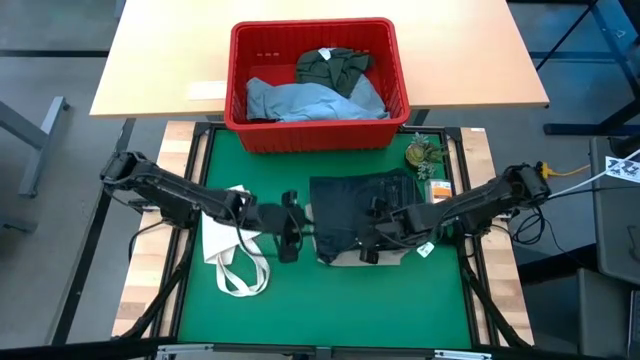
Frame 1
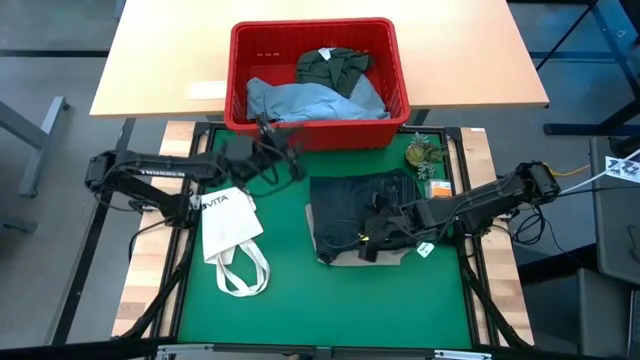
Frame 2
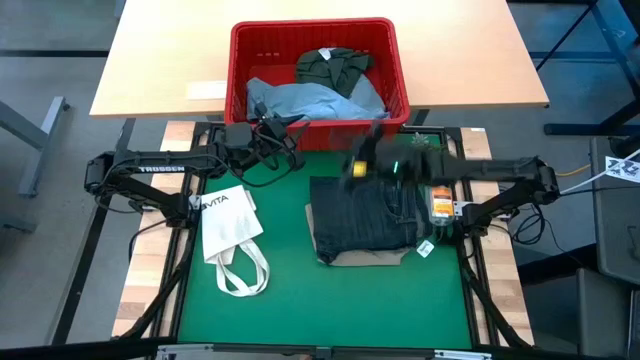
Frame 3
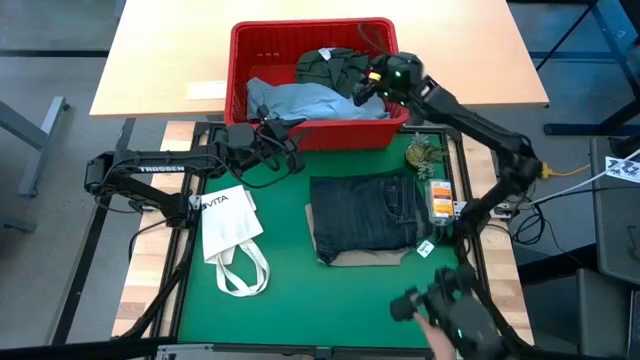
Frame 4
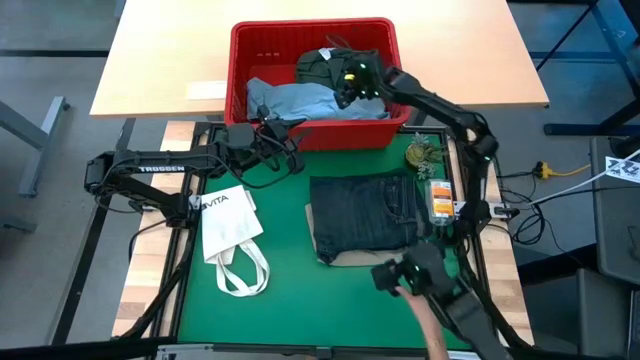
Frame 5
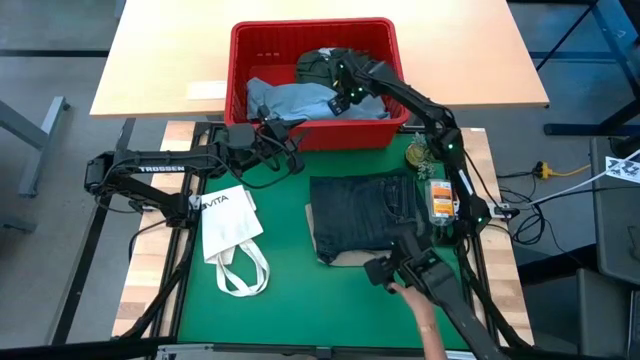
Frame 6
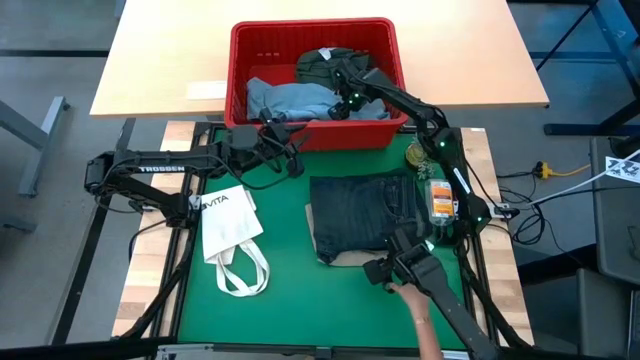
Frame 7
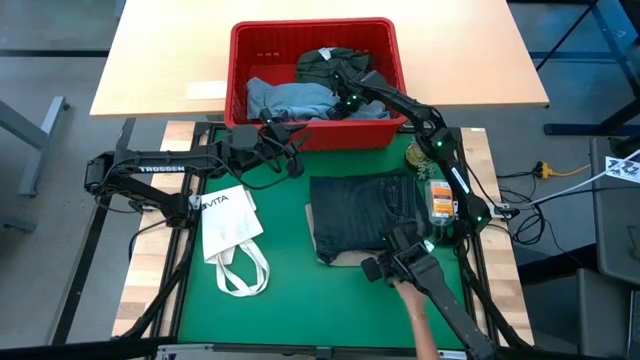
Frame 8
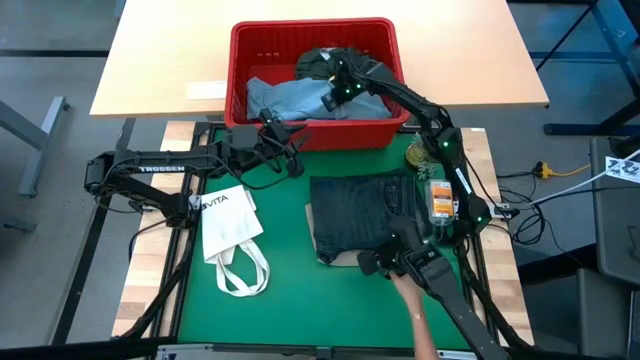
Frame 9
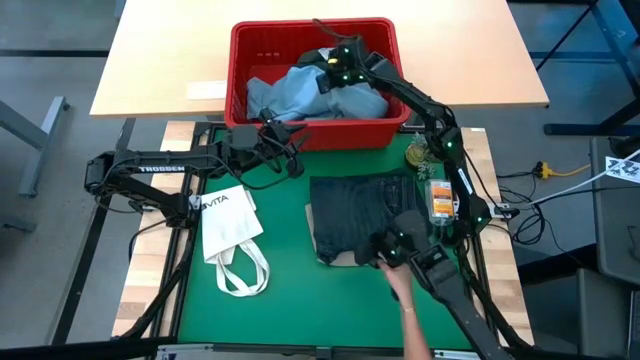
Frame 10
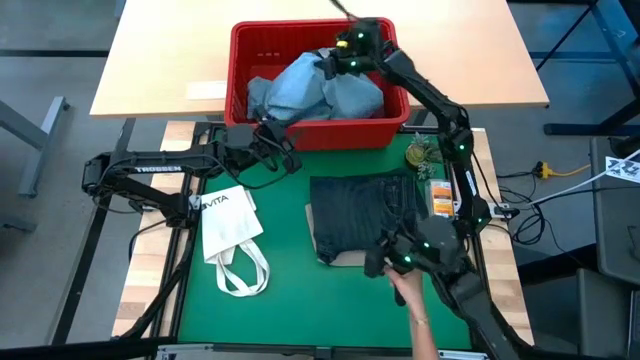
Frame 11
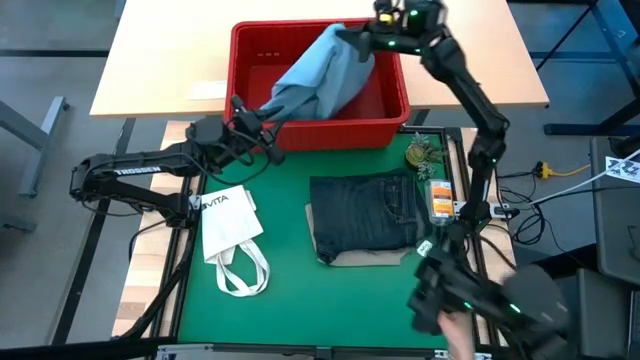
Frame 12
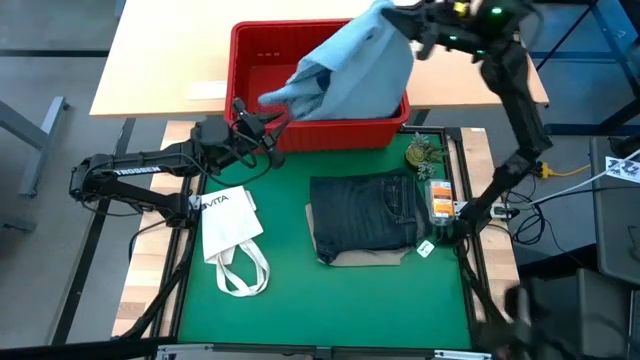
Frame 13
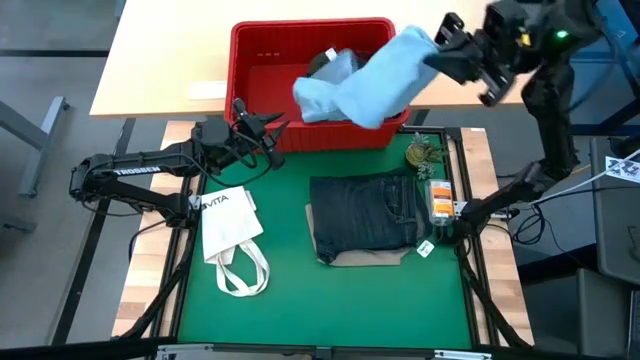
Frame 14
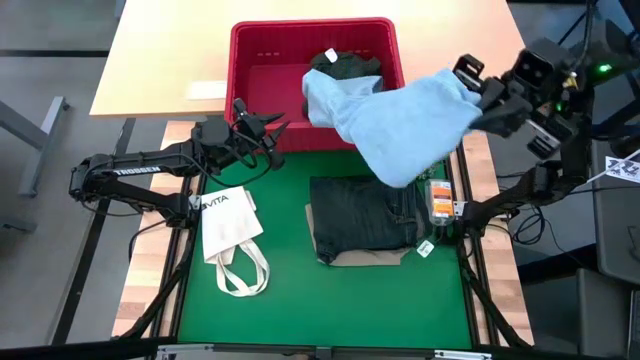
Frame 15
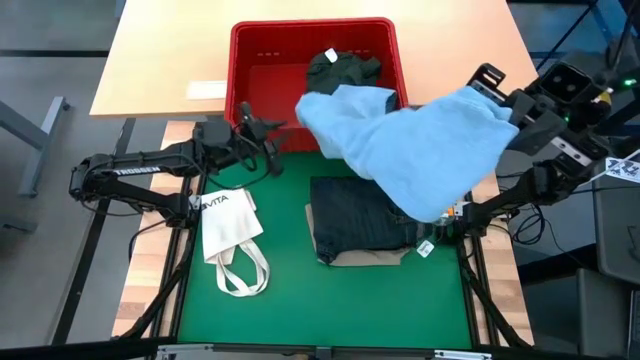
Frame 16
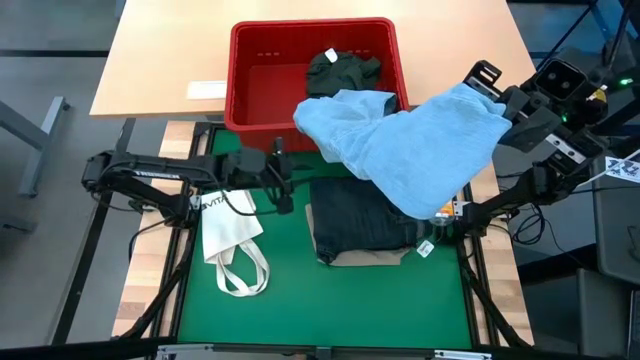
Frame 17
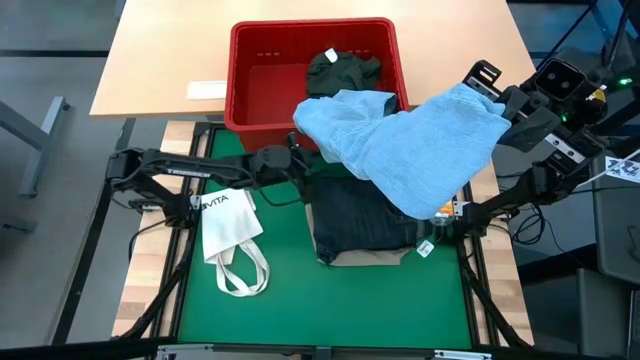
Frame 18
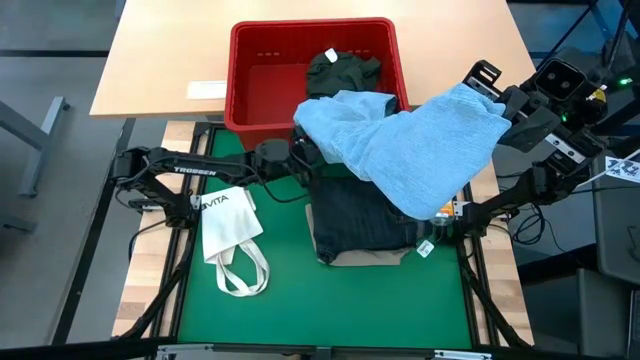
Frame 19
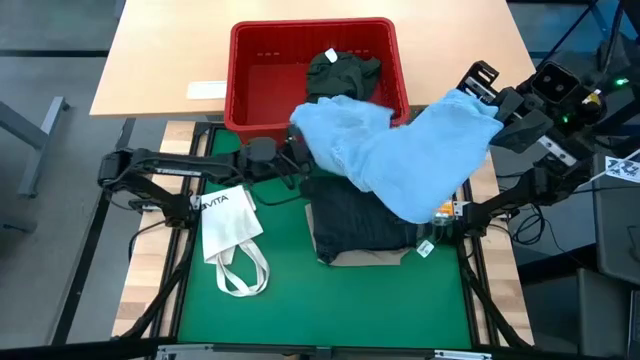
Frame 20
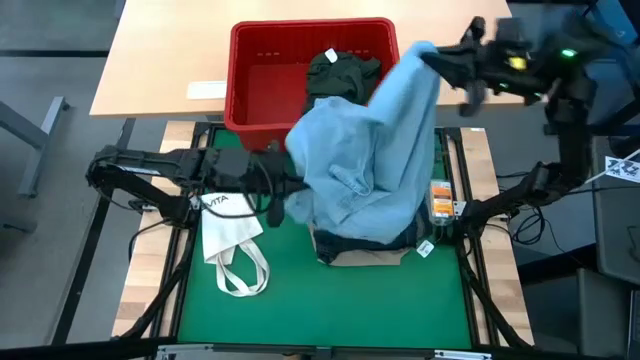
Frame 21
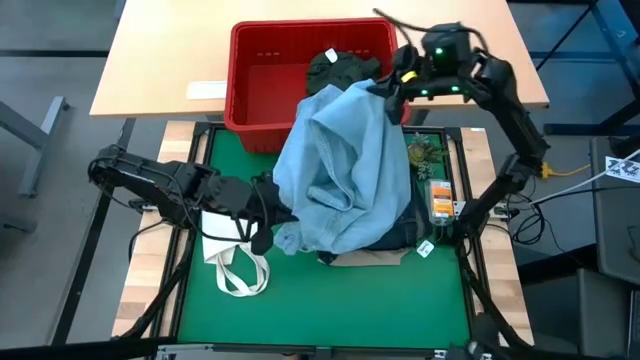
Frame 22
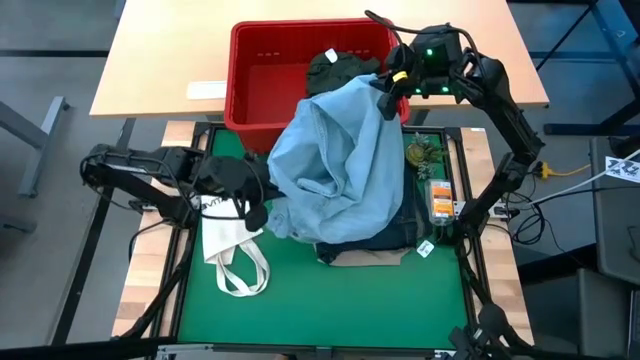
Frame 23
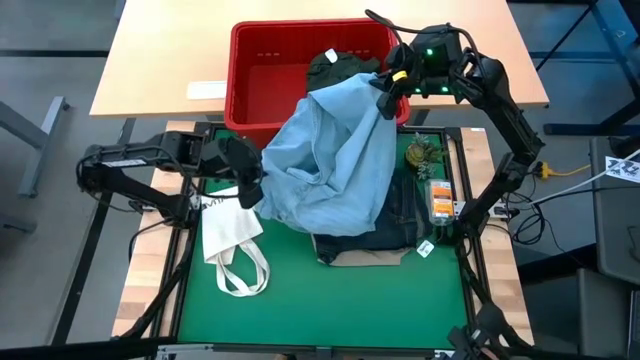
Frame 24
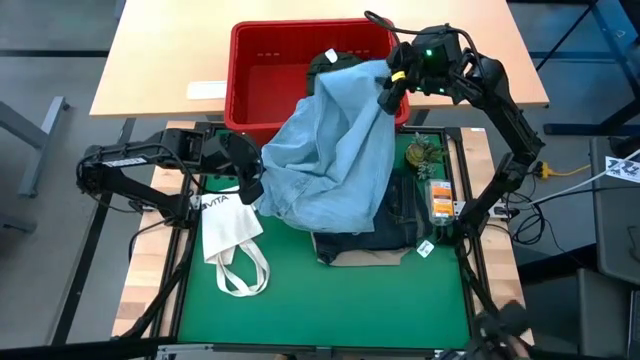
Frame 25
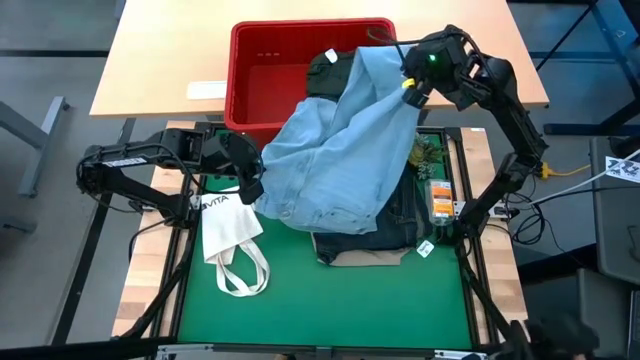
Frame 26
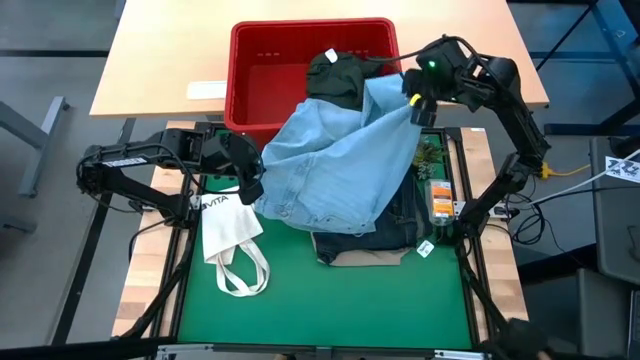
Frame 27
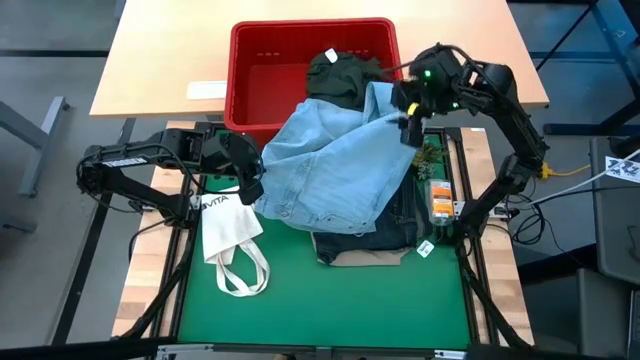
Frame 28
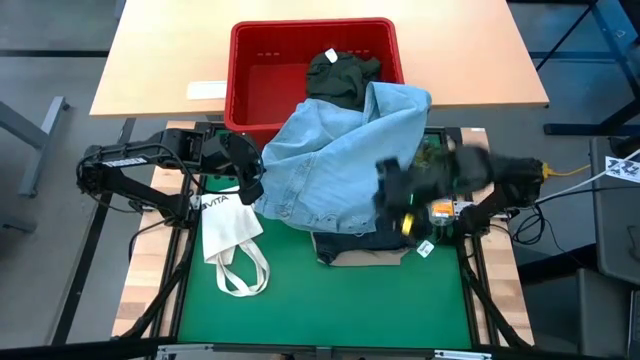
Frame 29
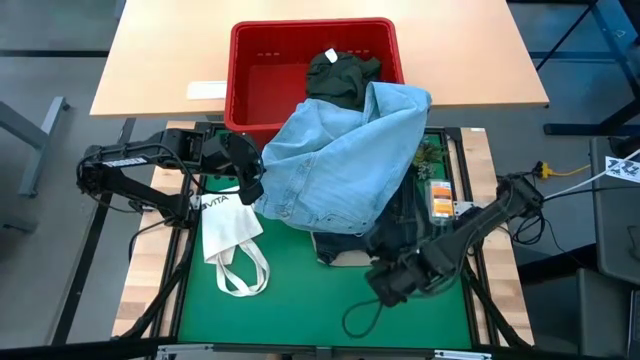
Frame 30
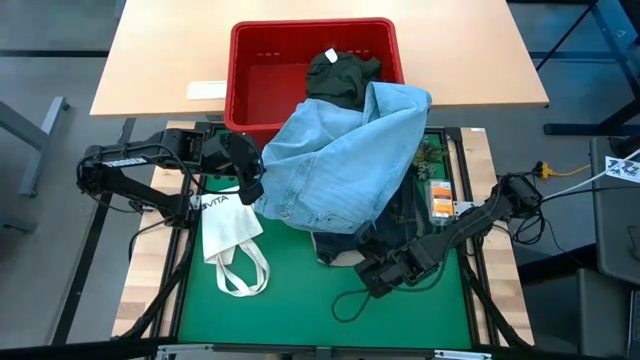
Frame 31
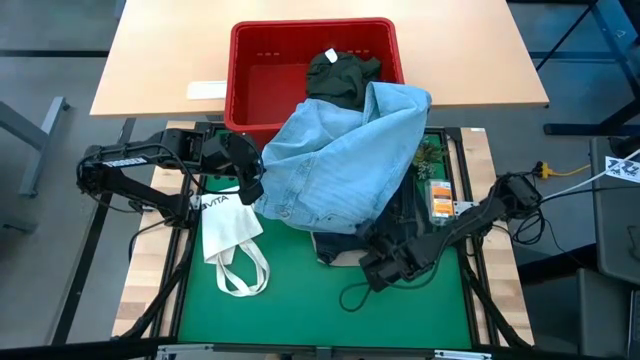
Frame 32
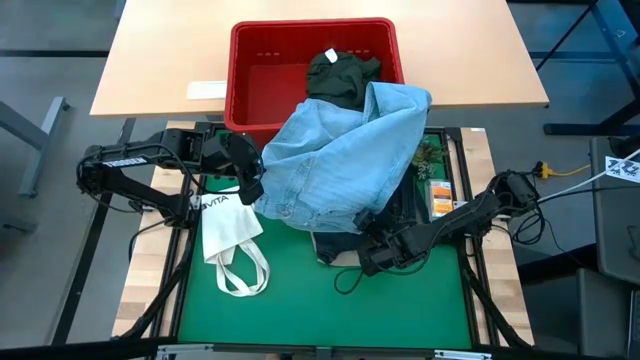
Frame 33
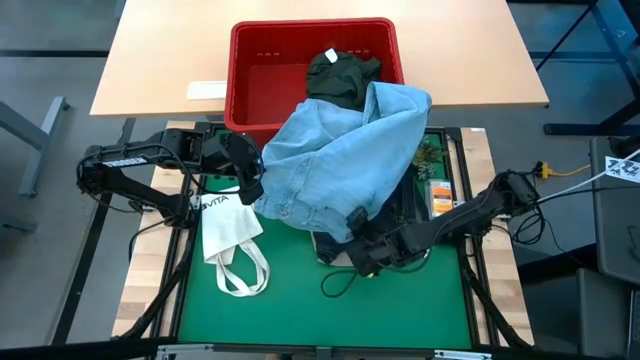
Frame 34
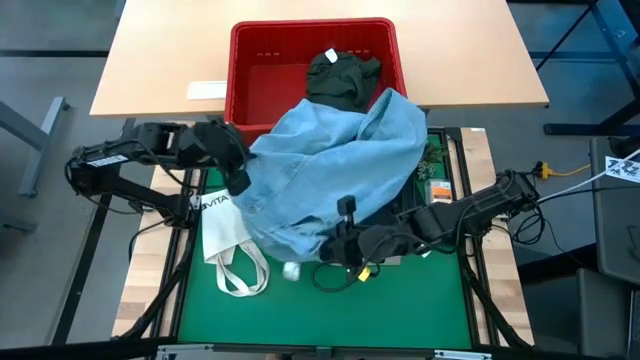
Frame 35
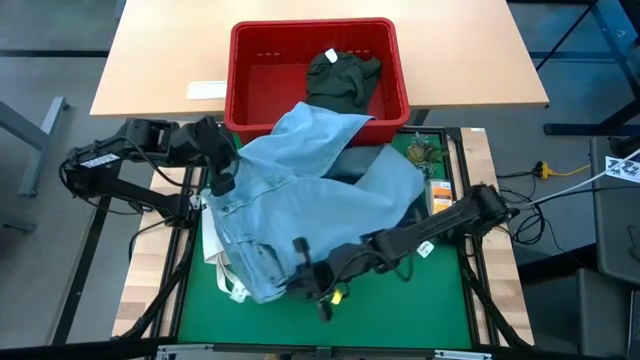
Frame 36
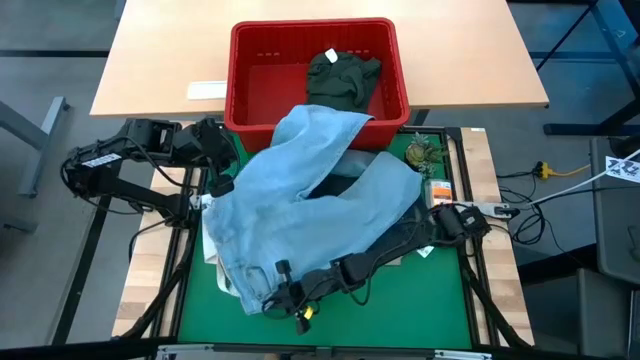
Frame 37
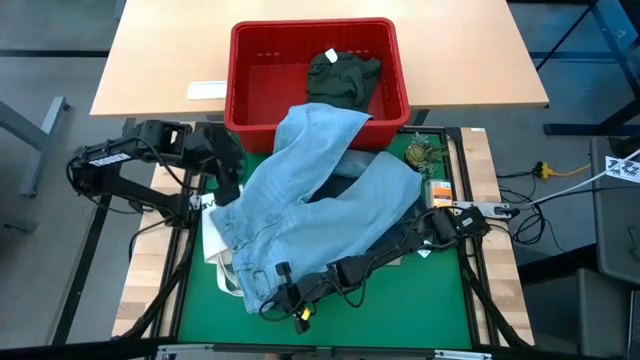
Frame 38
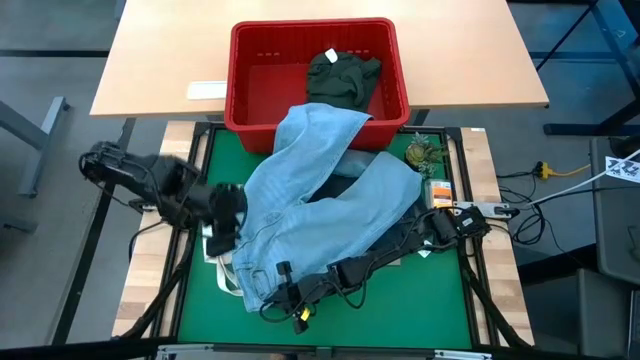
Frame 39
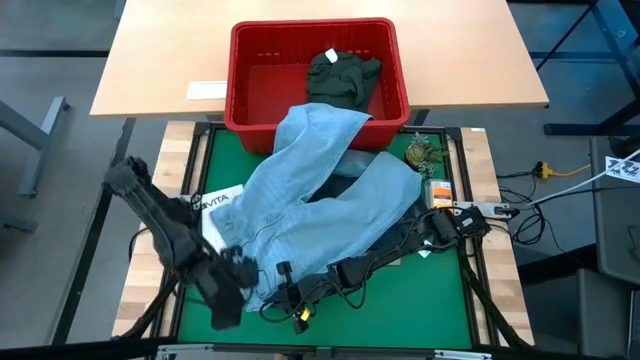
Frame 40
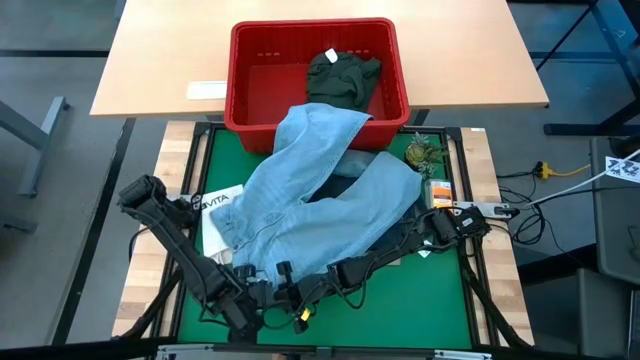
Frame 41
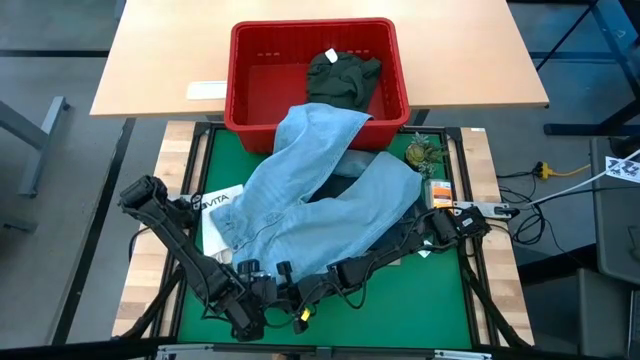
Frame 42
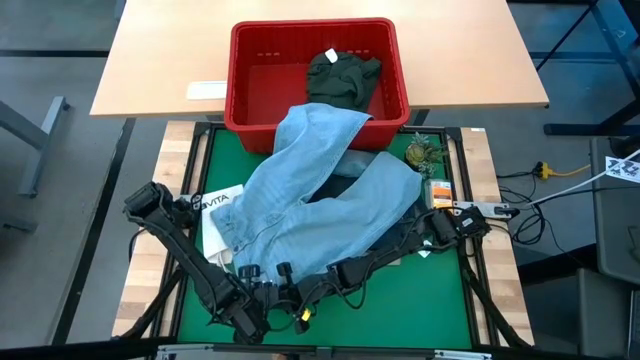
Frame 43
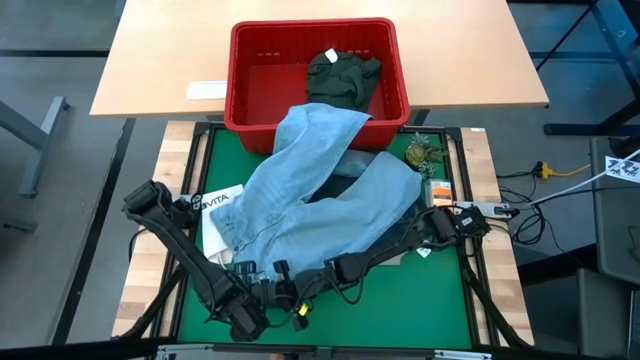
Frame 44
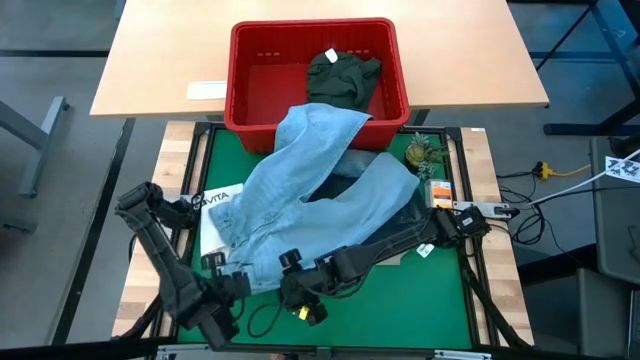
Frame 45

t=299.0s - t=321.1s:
Task: Fold Laundry from Bin
Fold the light blue jeans
